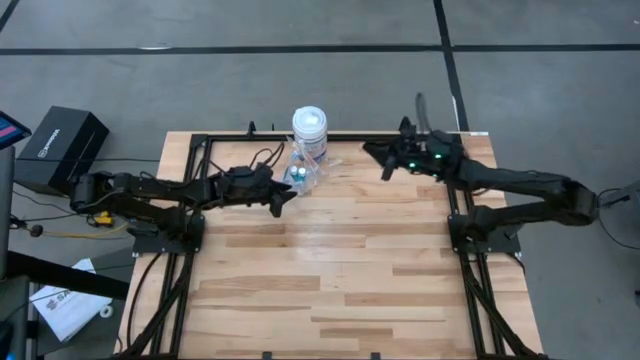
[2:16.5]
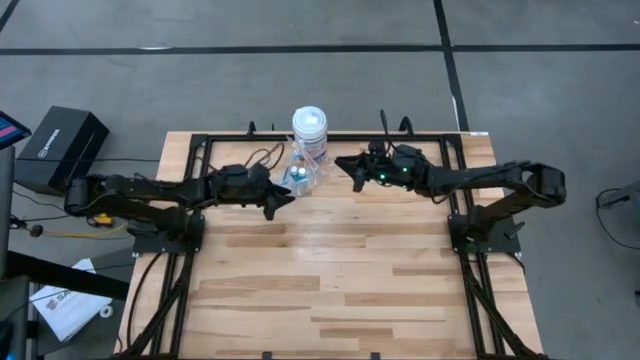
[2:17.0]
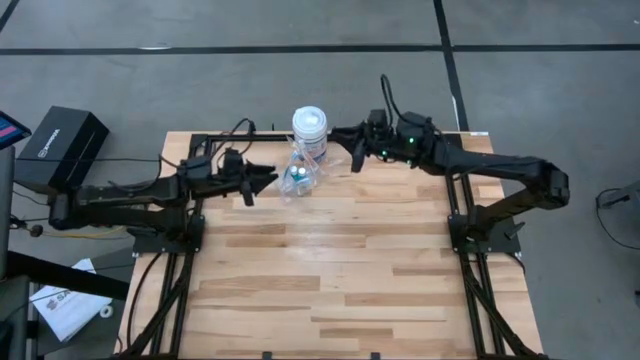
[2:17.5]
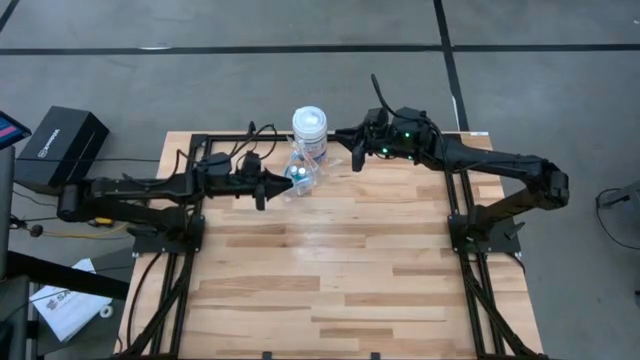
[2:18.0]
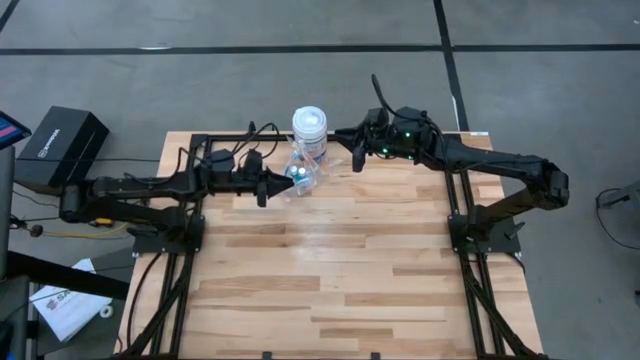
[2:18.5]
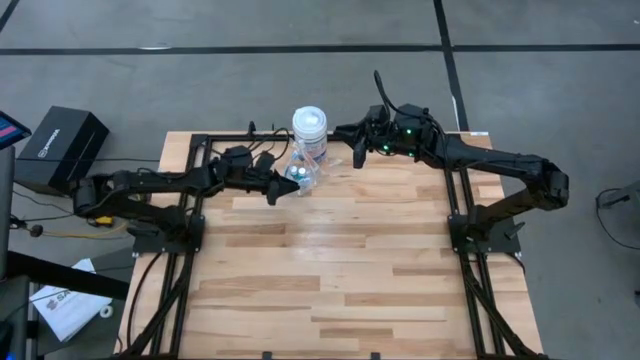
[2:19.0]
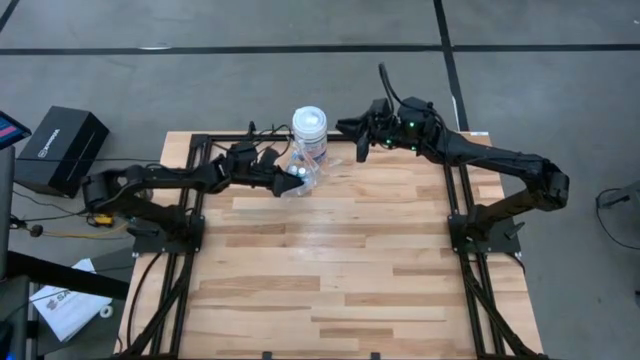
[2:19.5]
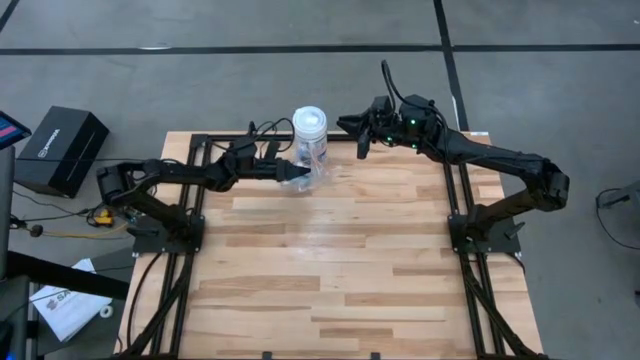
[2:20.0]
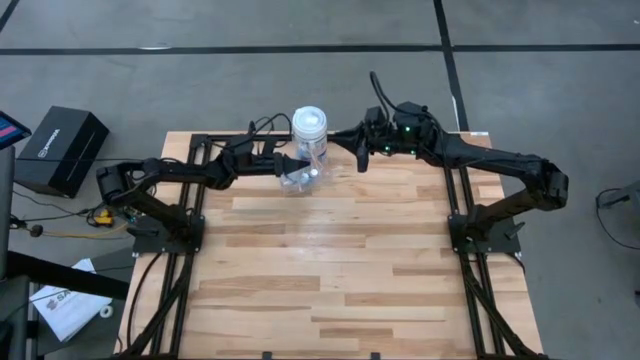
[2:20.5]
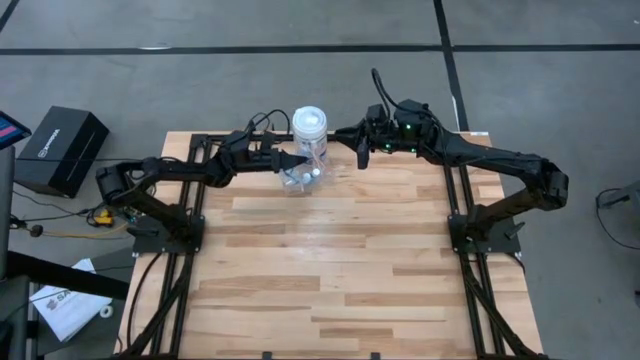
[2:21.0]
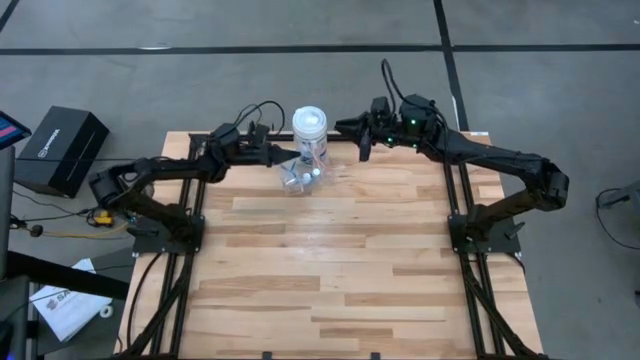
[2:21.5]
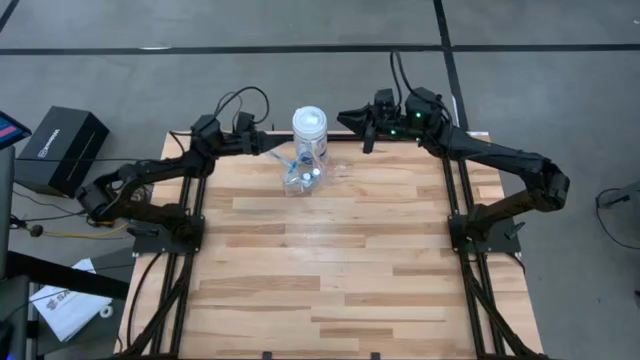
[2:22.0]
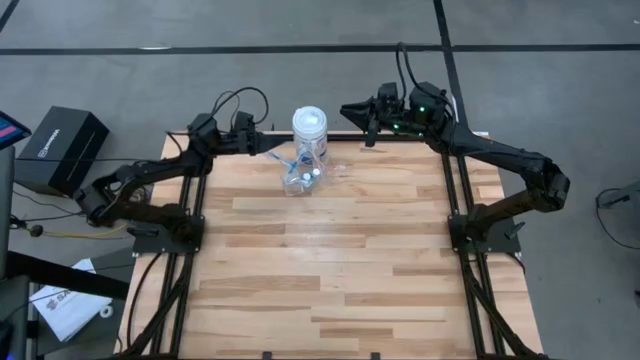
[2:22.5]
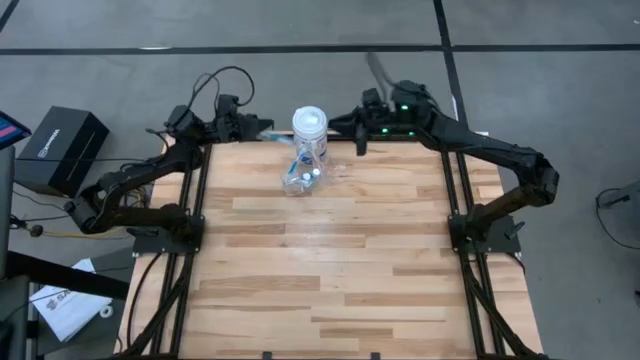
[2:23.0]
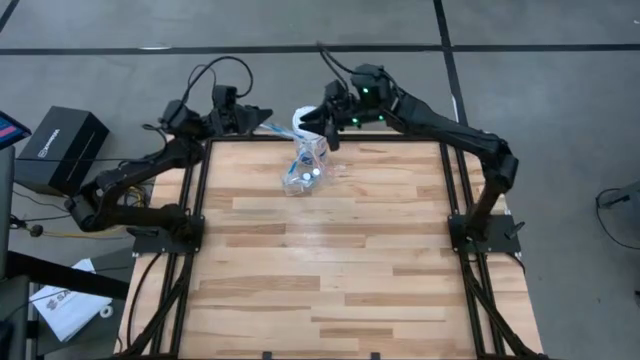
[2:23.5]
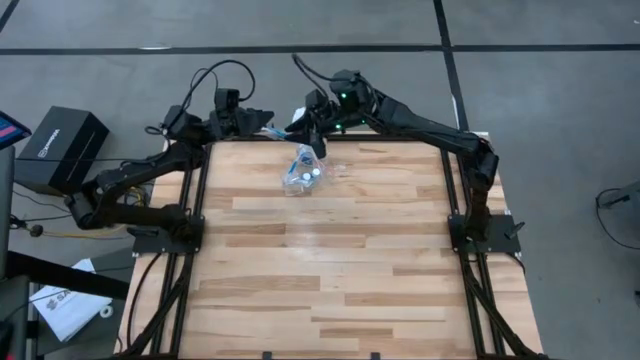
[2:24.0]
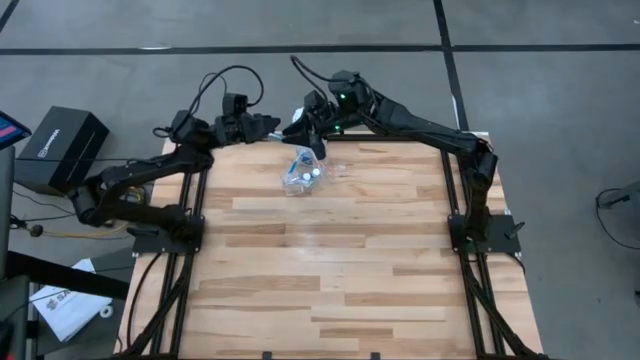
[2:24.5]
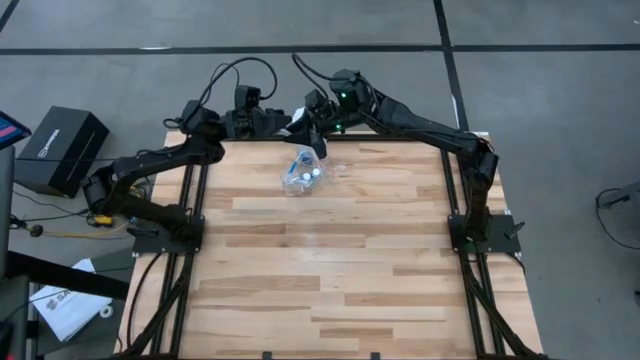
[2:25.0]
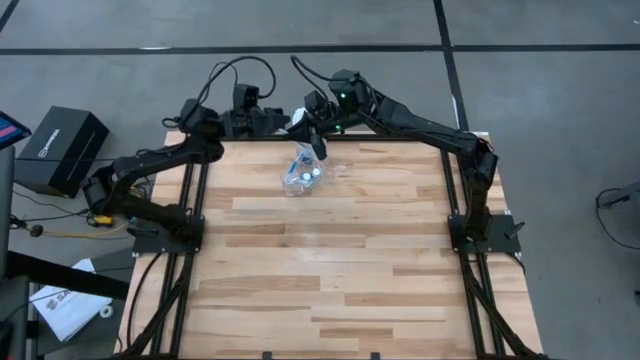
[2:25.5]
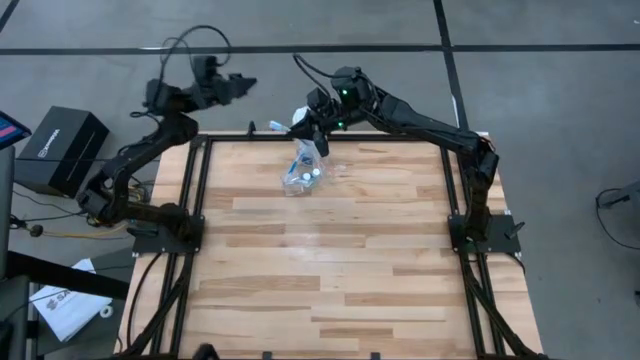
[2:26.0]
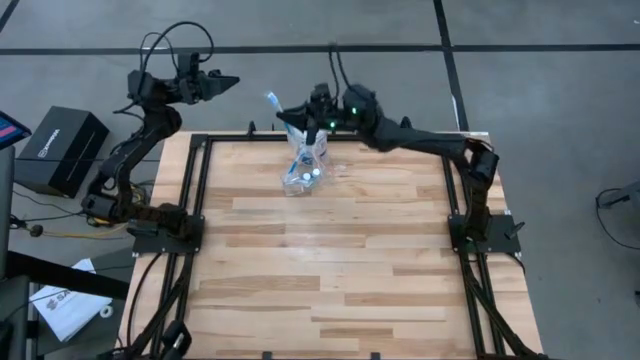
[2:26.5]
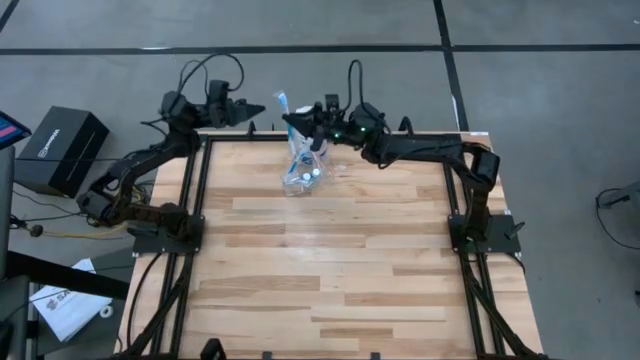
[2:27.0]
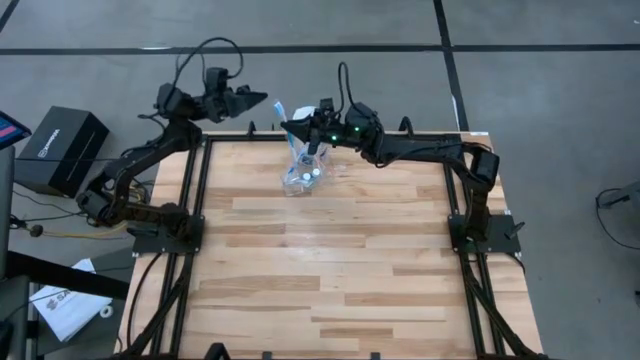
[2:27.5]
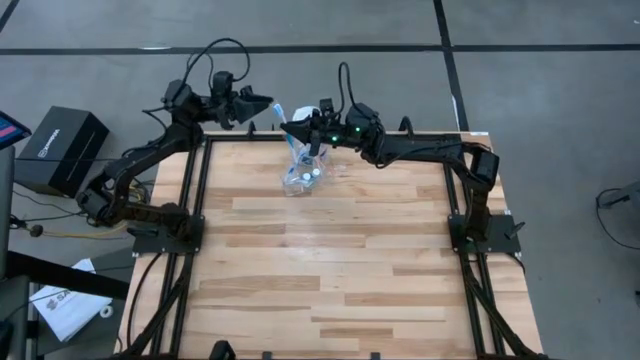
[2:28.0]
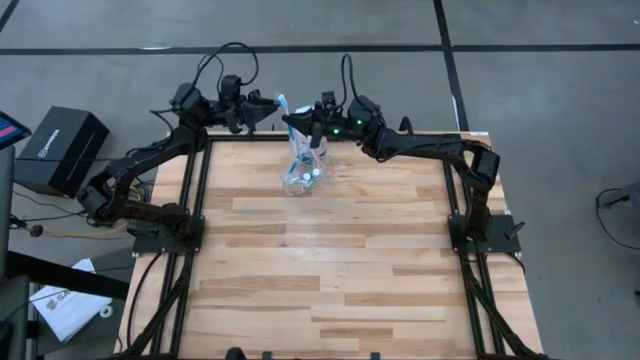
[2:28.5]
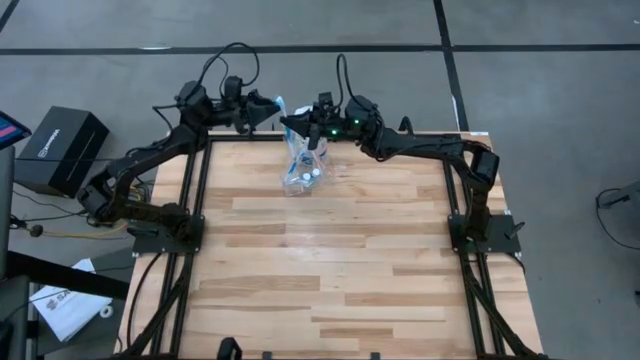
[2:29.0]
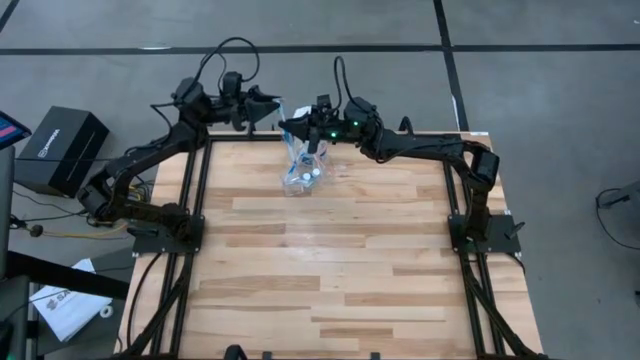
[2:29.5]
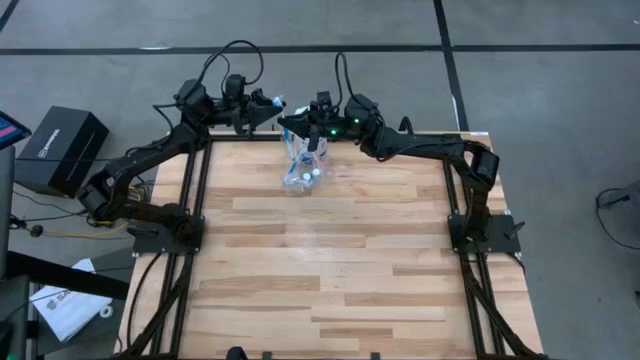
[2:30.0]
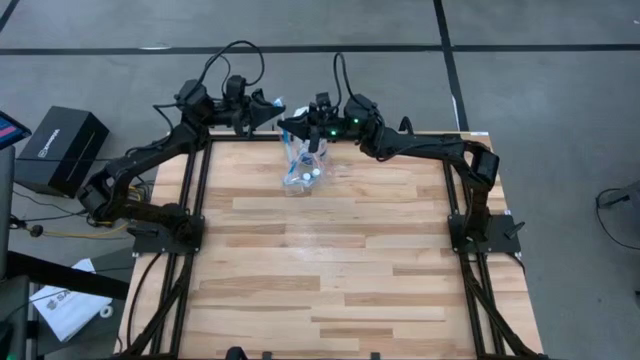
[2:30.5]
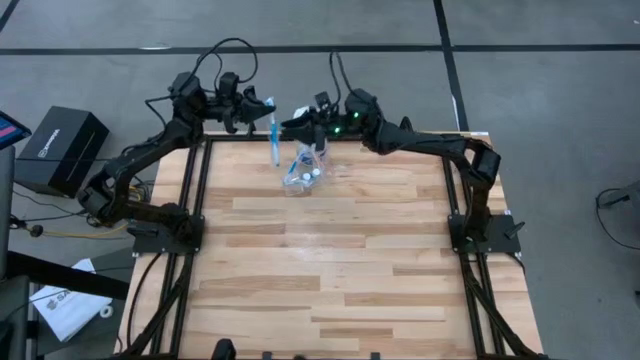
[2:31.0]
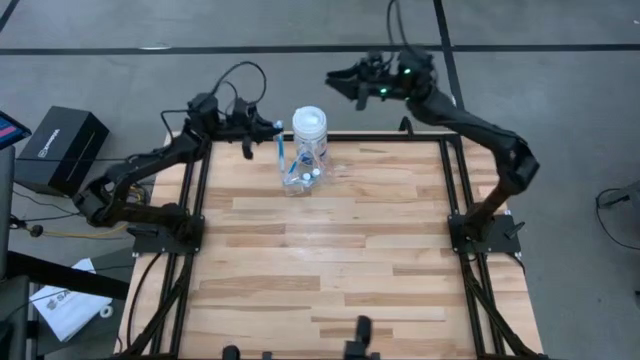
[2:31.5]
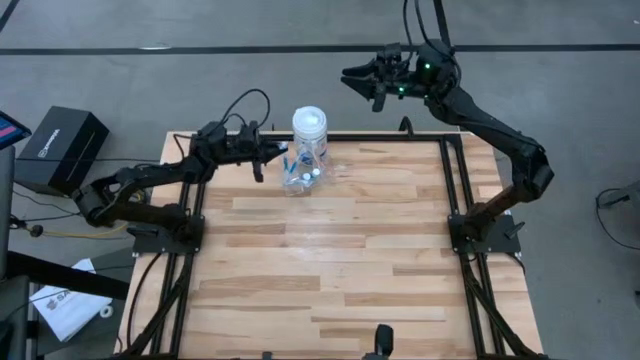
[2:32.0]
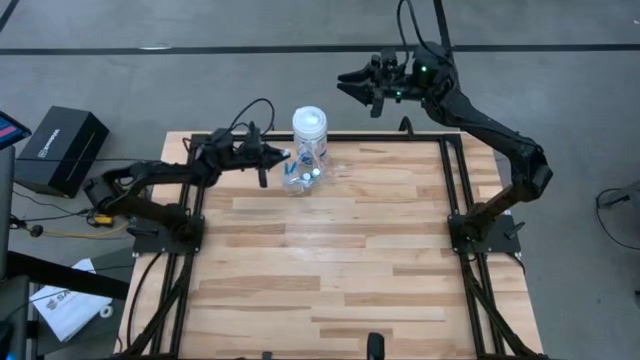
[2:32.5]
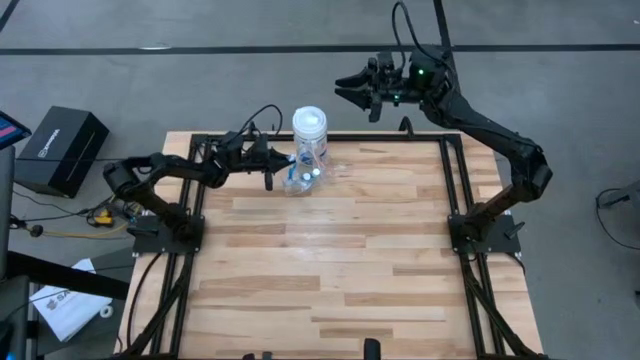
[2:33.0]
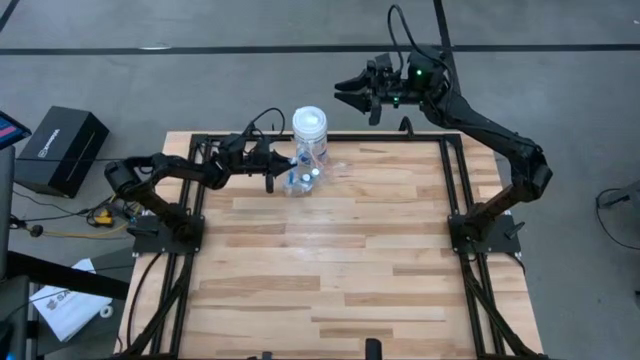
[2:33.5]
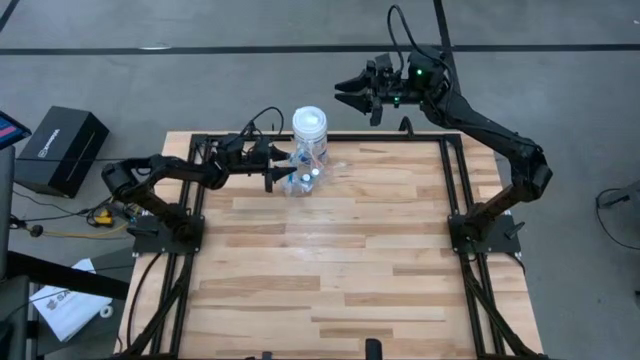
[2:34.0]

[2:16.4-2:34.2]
Task: Pick & Place toothbrushing station
Adjust the blue toothbrush in the transparent organizer

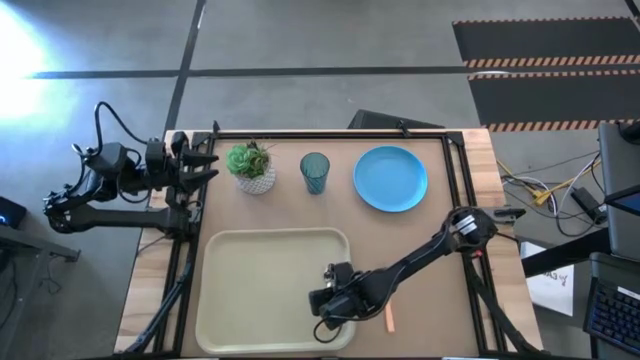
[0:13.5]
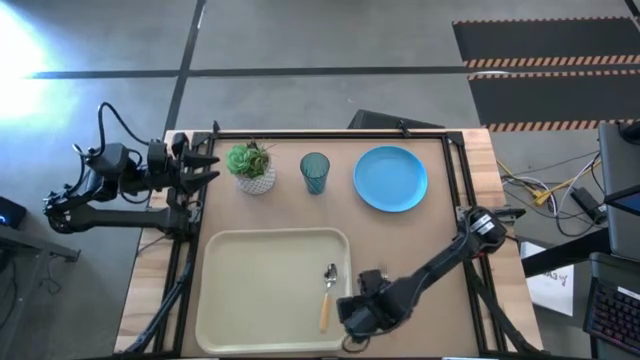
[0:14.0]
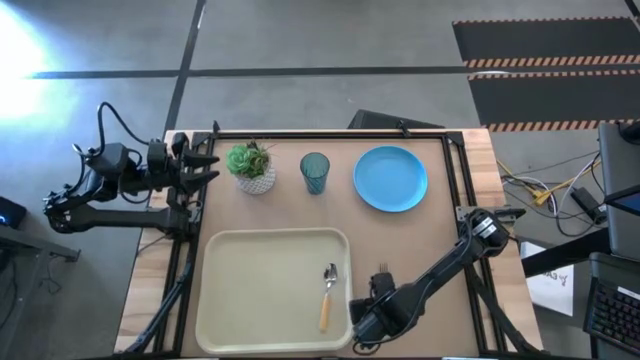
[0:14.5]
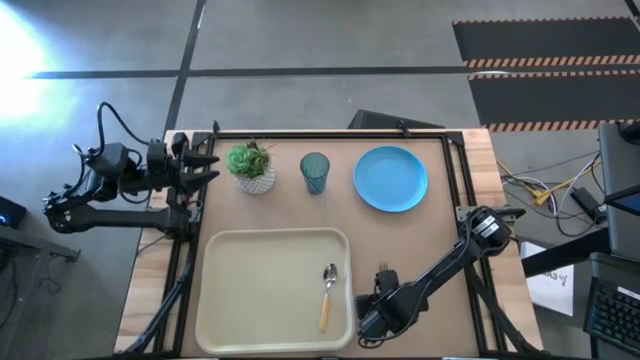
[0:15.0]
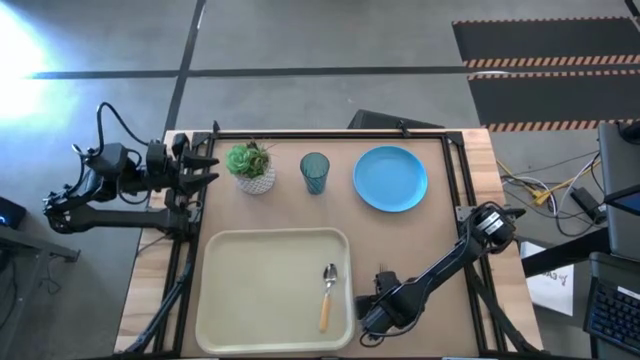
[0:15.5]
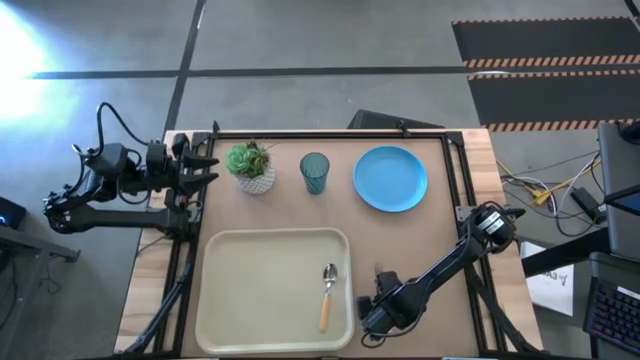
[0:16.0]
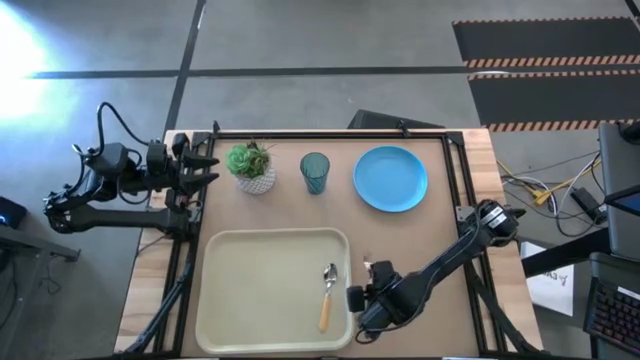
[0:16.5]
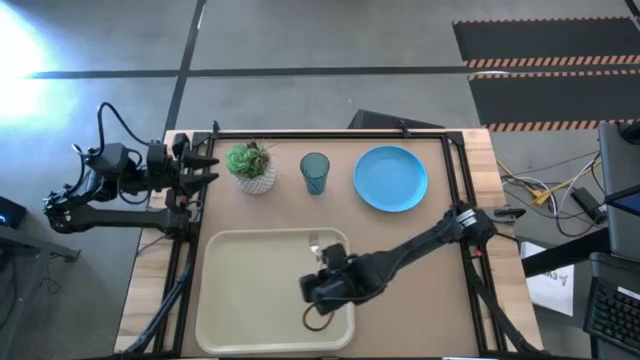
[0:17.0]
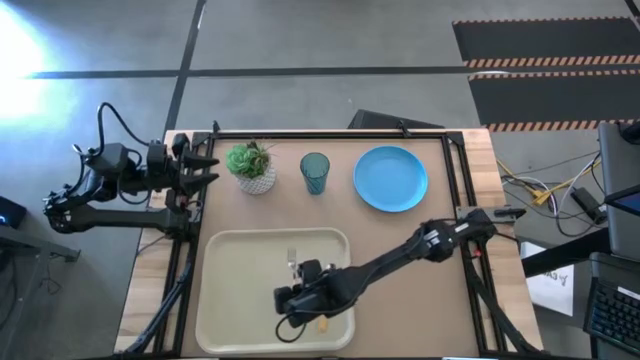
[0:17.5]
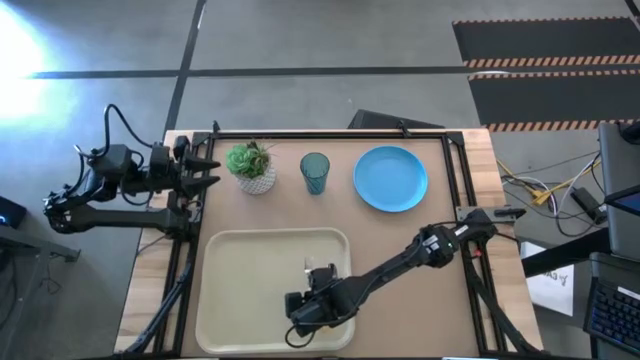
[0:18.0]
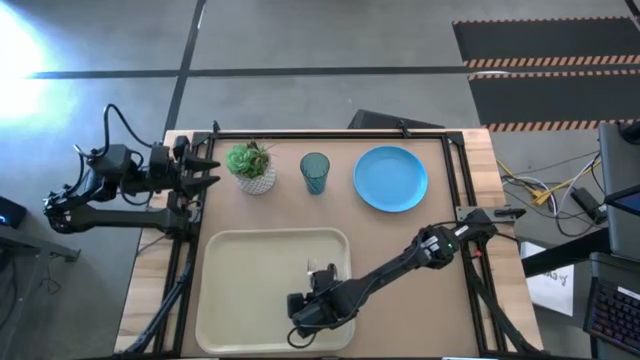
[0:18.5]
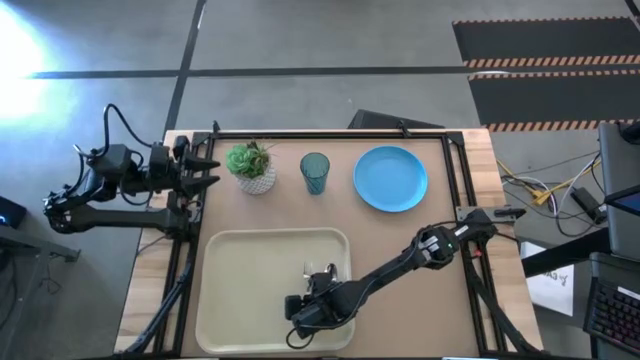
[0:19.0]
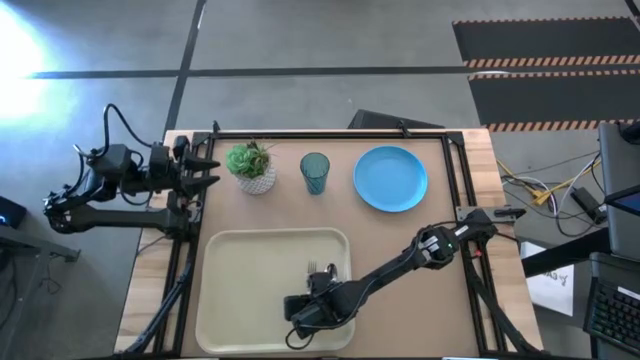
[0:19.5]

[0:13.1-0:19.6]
Task: Pick and place plate/cup/fork/spoon on tray
Put the light pink fork on the left side of the orange spoon on the gray tray
